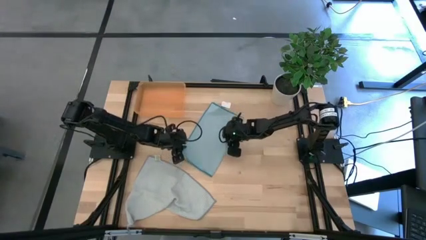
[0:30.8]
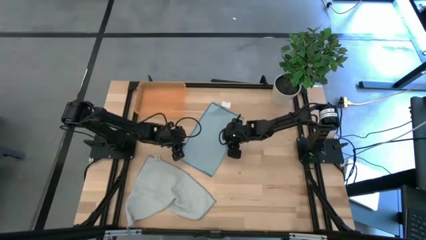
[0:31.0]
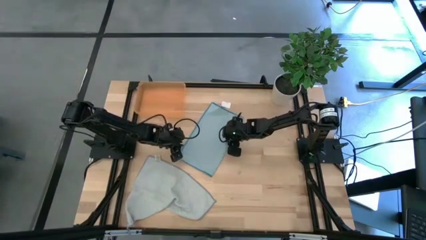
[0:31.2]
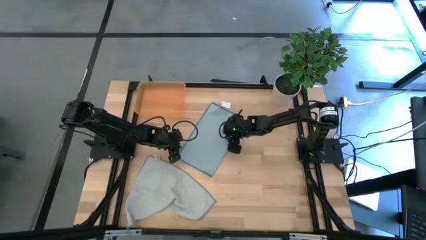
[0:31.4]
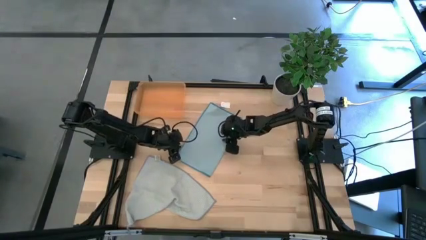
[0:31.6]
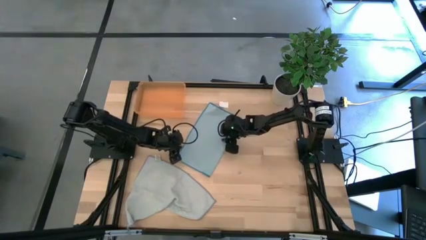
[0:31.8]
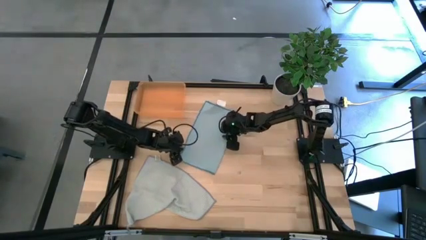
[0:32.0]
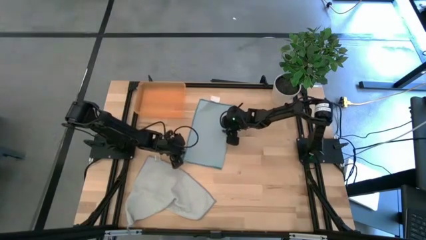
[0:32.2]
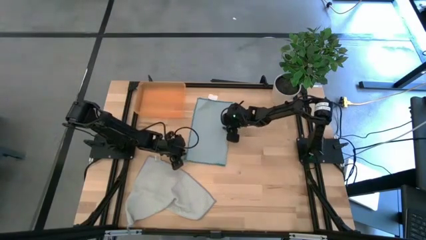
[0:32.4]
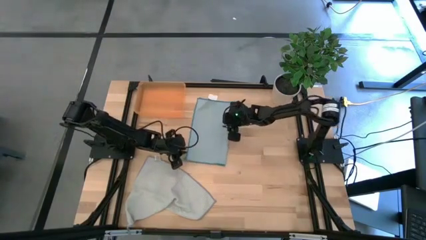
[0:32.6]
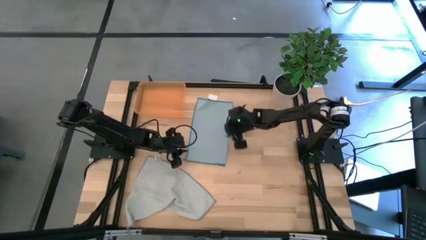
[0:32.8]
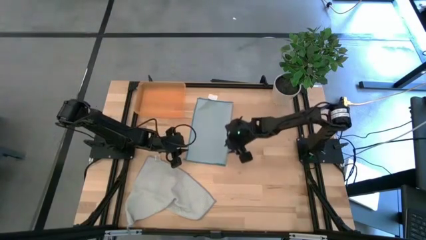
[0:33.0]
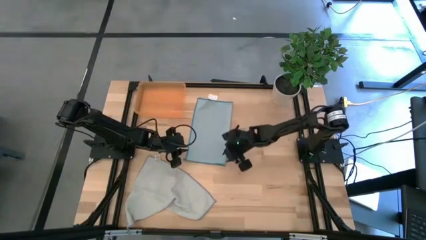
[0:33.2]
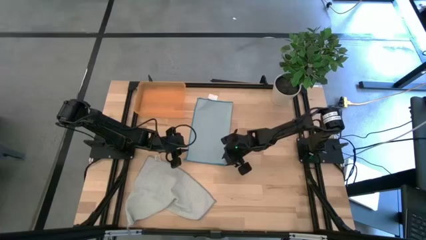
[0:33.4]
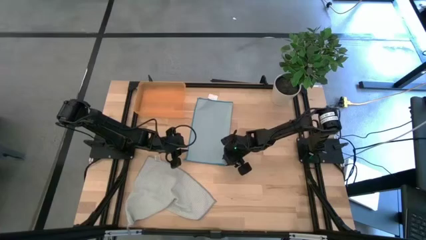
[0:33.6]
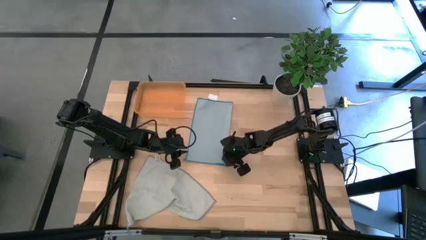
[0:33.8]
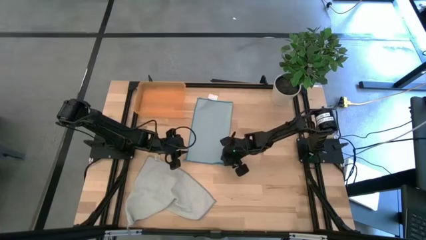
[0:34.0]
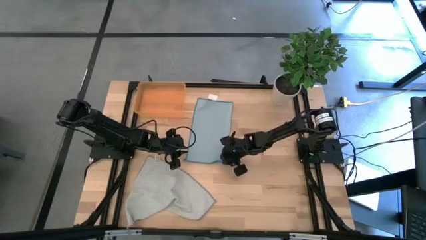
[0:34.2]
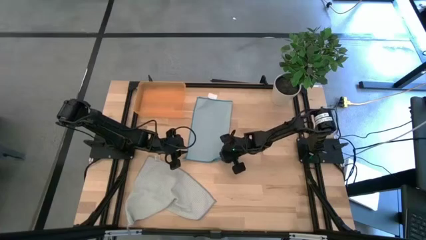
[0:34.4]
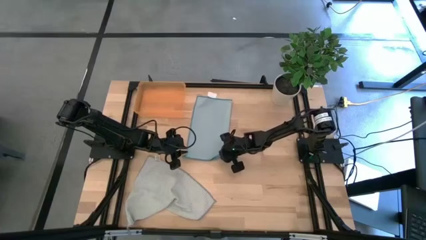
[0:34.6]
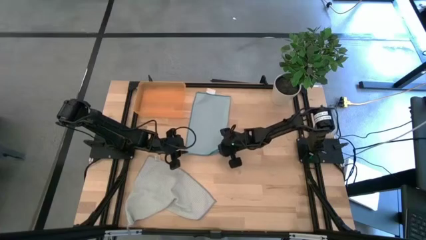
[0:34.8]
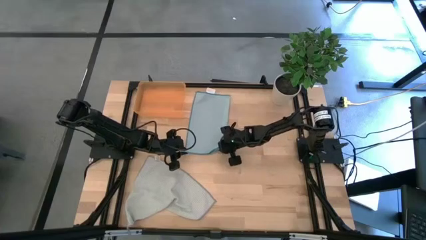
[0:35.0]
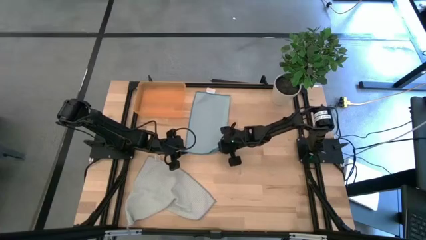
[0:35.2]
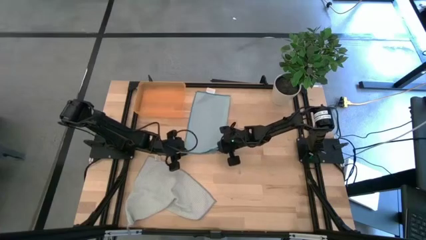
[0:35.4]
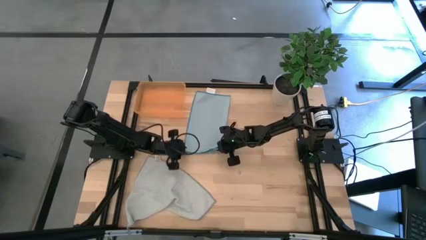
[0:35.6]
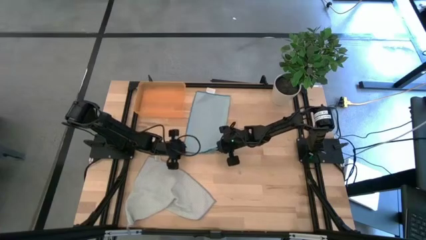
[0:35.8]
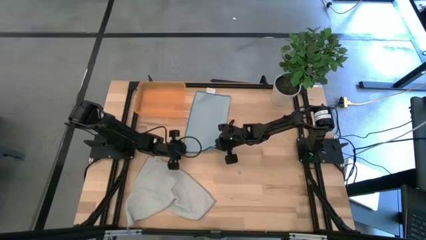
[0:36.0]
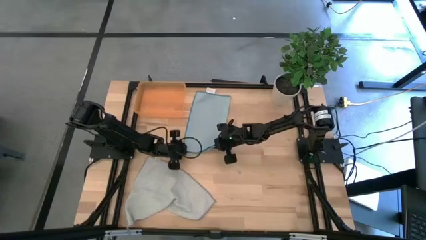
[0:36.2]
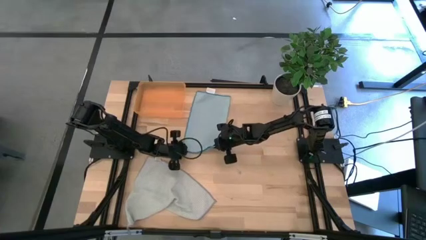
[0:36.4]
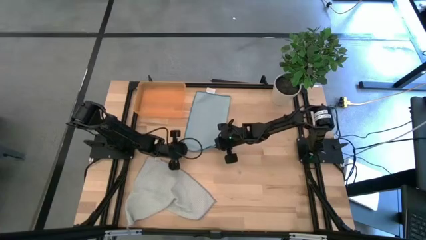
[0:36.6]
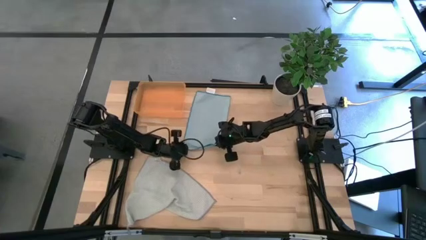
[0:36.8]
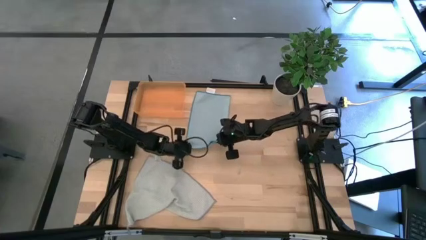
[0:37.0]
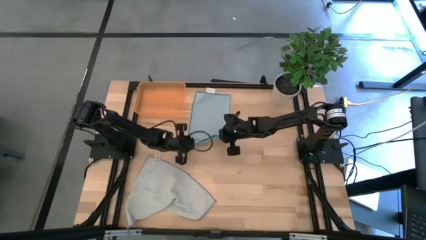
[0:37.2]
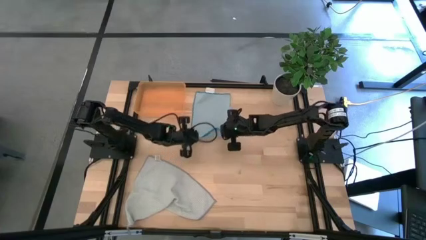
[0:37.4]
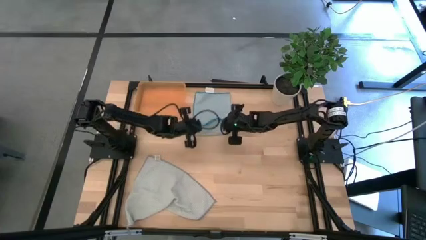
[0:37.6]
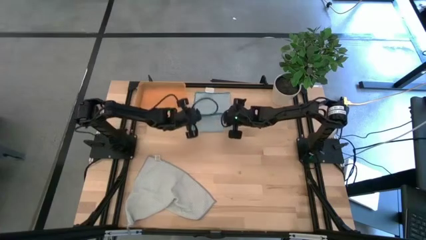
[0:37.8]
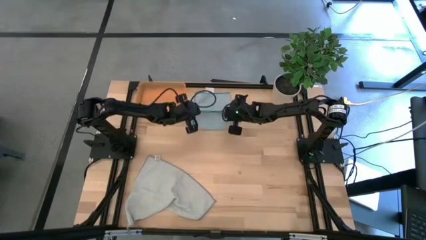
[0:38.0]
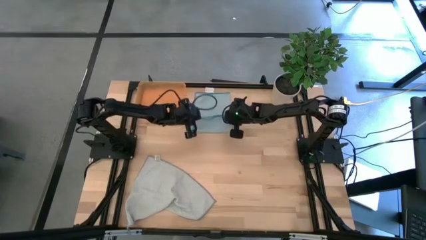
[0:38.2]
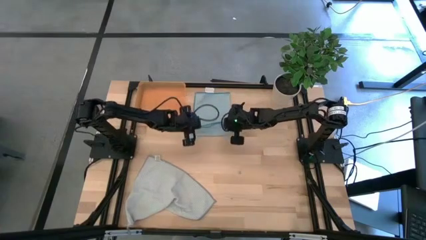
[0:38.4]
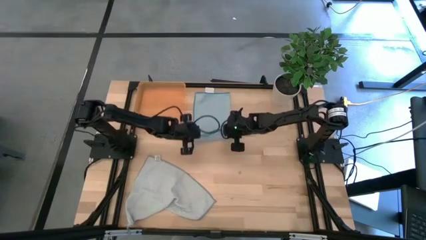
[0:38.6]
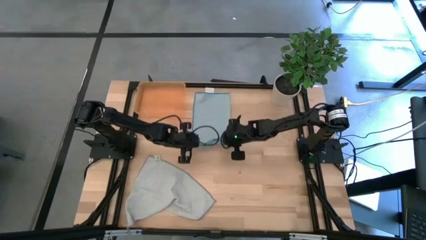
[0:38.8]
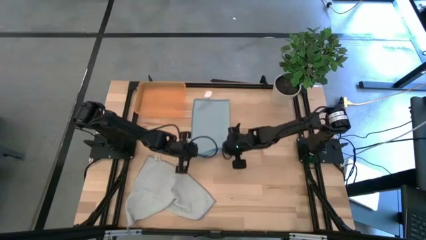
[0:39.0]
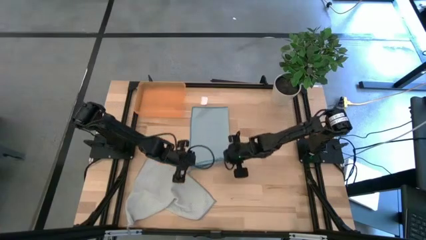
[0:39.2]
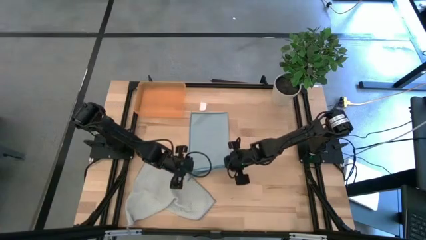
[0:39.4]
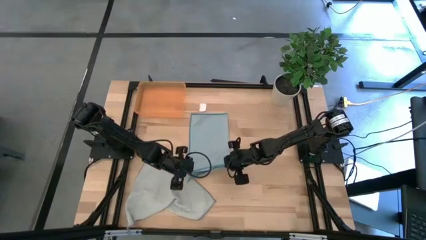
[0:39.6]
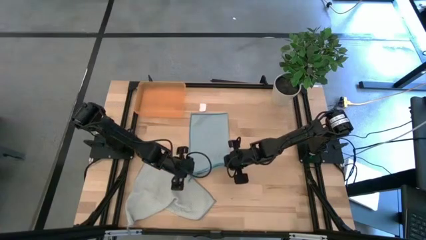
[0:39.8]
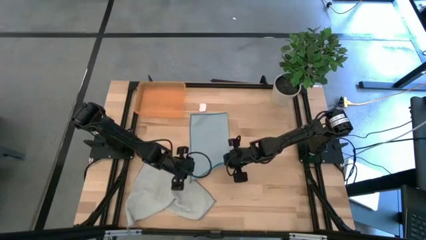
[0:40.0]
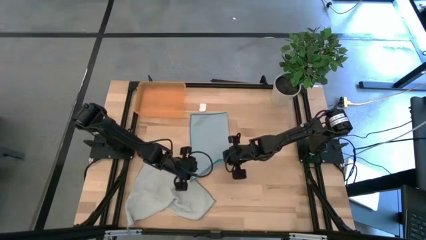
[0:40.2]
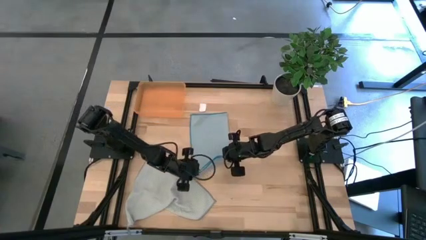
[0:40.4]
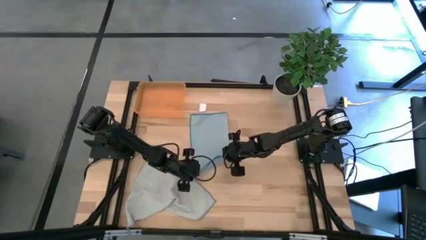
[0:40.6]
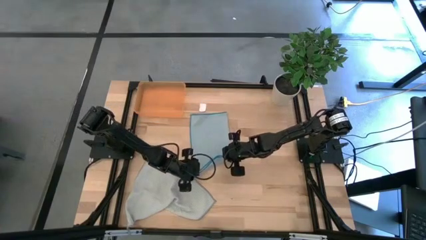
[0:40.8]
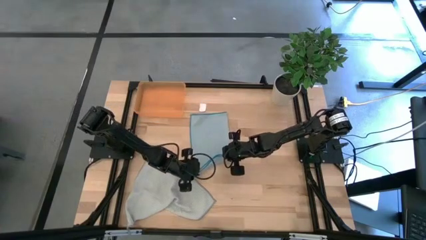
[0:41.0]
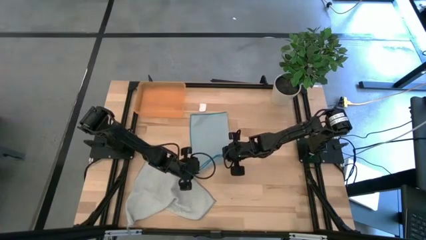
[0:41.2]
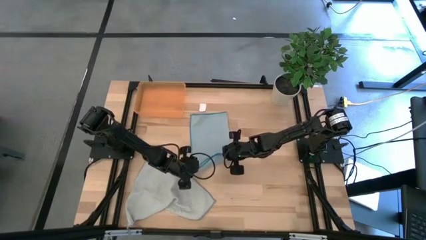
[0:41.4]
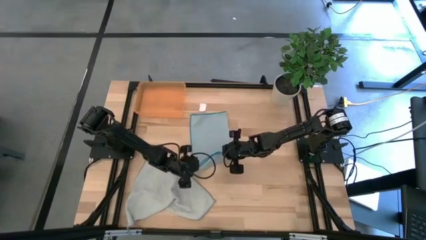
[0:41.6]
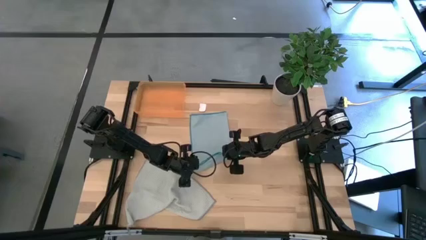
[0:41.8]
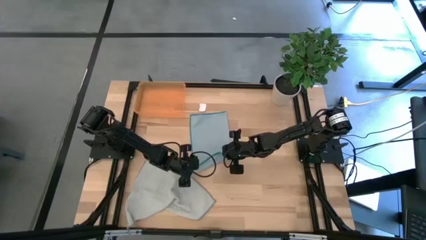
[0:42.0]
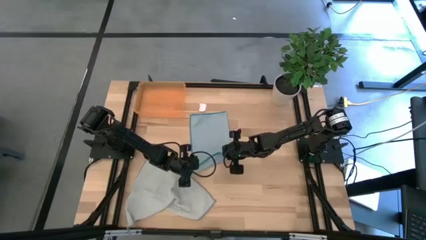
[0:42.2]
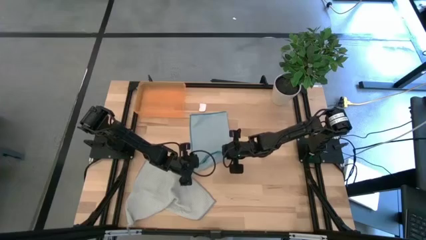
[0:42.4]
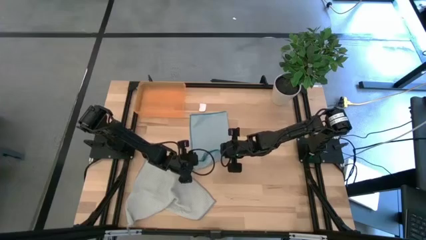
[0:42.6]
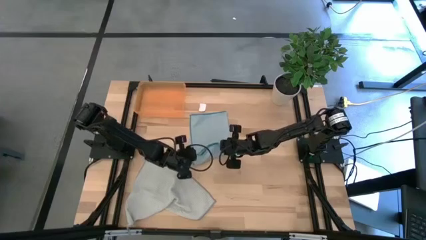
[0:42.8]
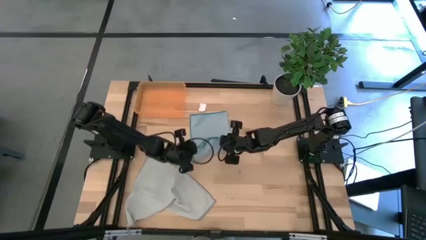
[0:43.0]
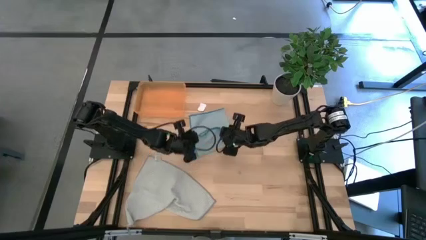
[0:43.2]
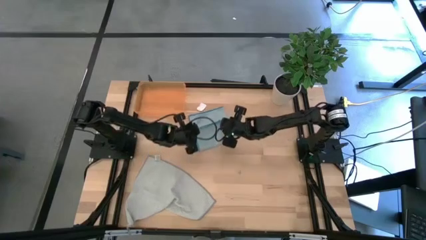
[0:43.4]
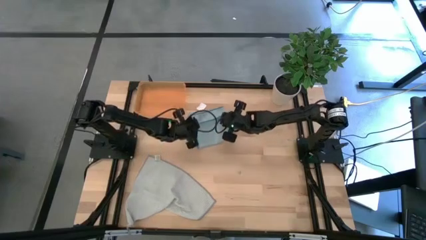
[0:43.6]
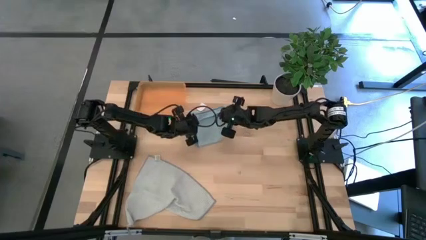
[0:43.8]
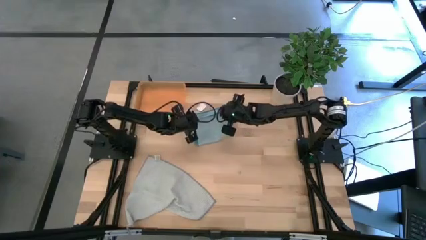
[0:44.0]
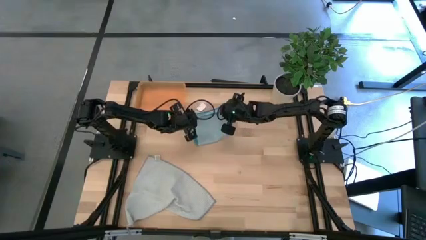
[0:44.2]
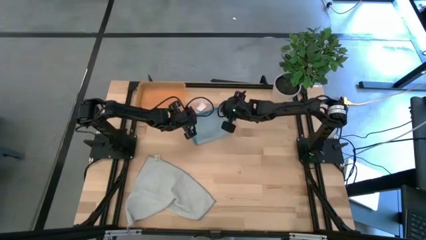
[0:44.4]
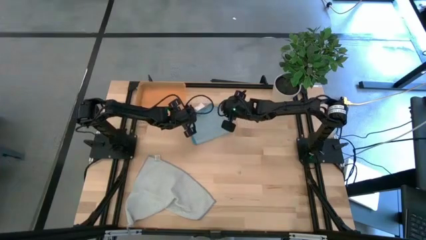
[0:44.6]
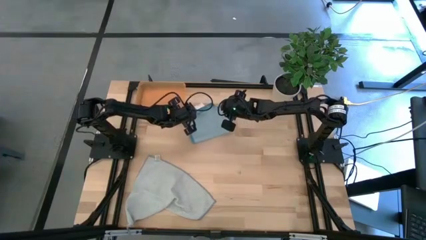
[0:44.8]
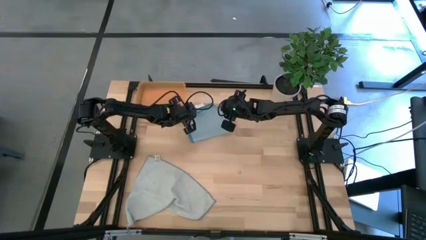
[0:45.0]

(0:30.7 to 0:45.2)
Task: Roll microfiber towels into tight, uniform cylinder then place into a basket
Fold the blue microfiber cloth
